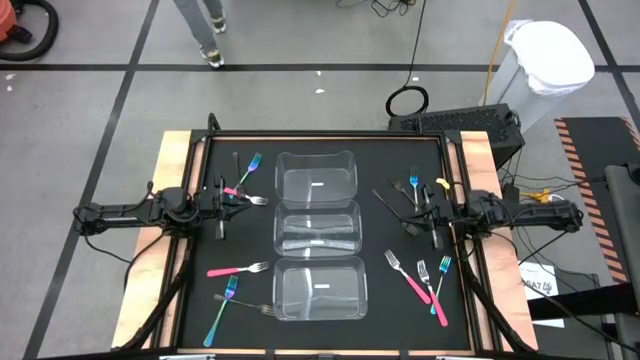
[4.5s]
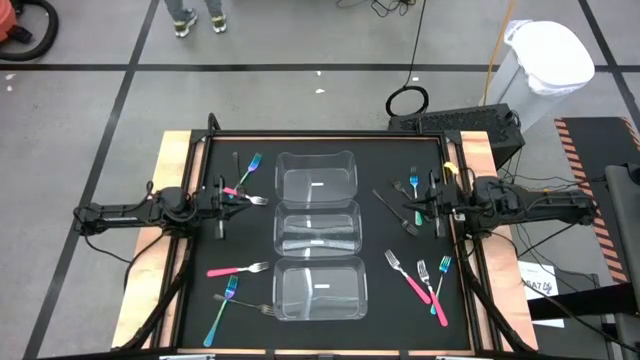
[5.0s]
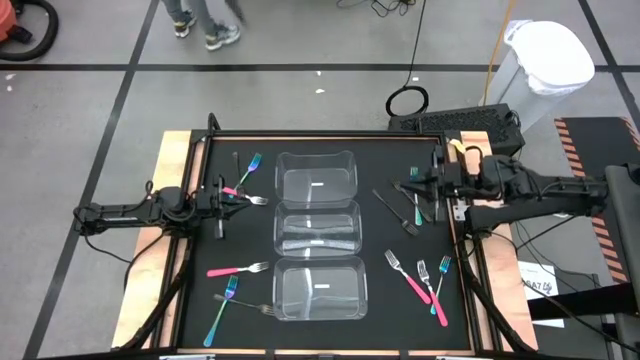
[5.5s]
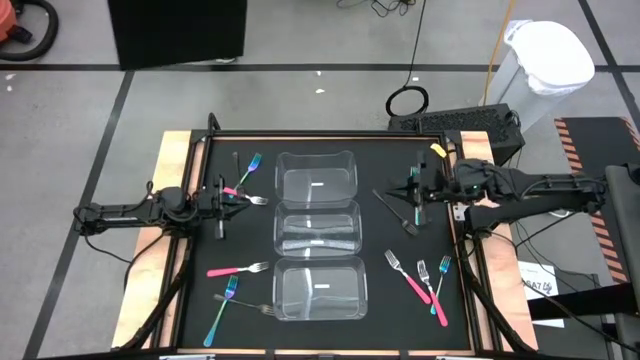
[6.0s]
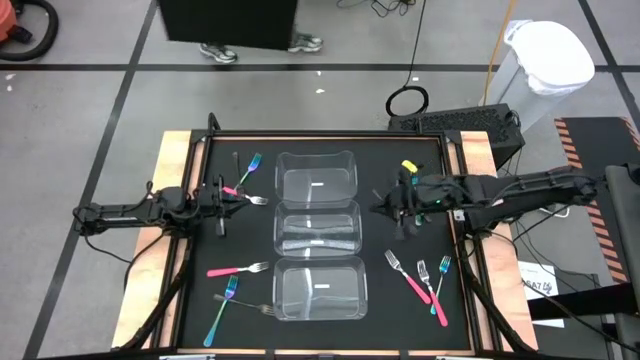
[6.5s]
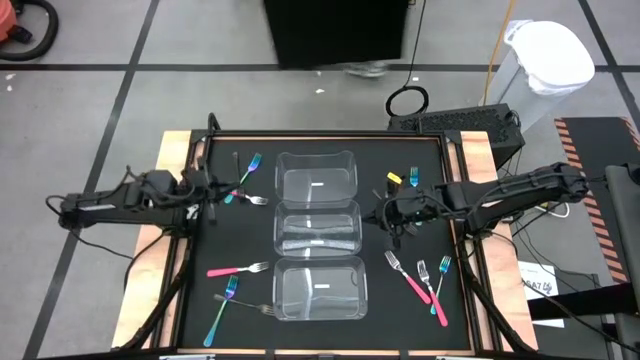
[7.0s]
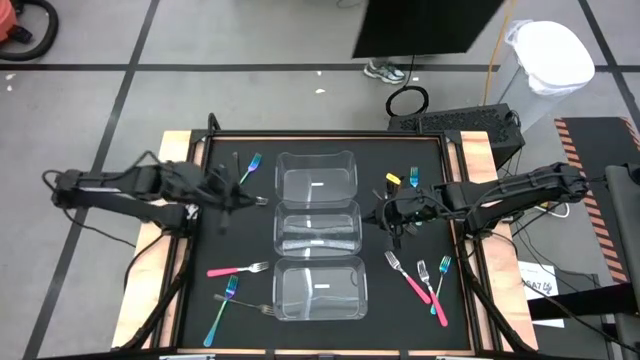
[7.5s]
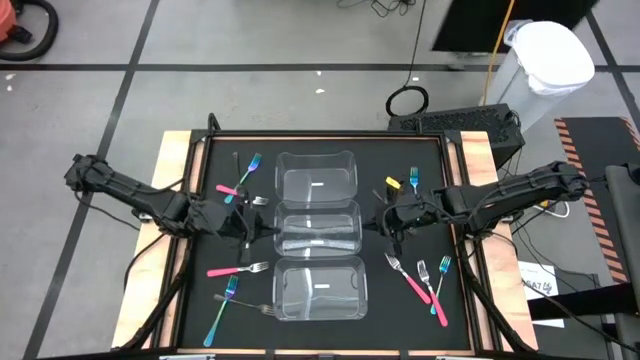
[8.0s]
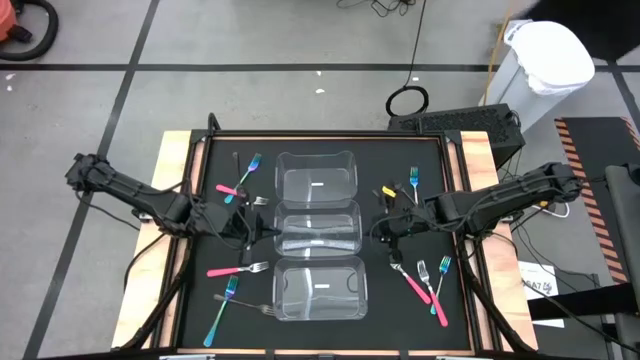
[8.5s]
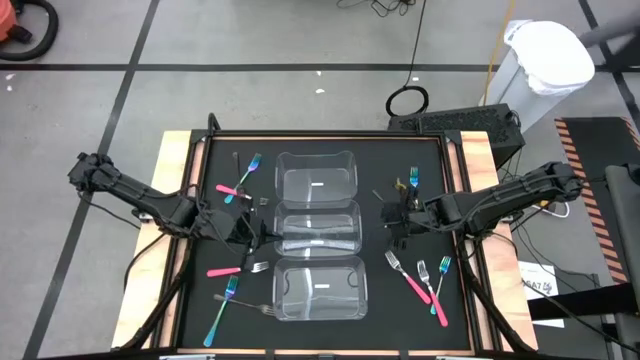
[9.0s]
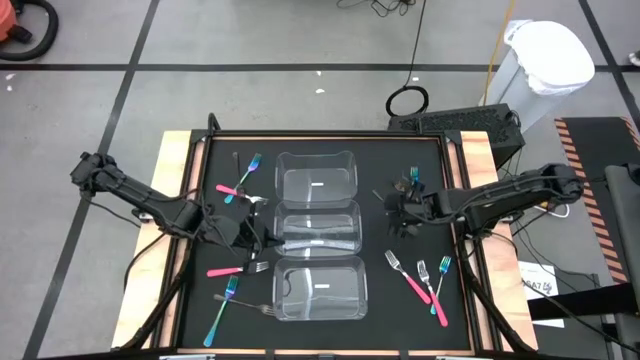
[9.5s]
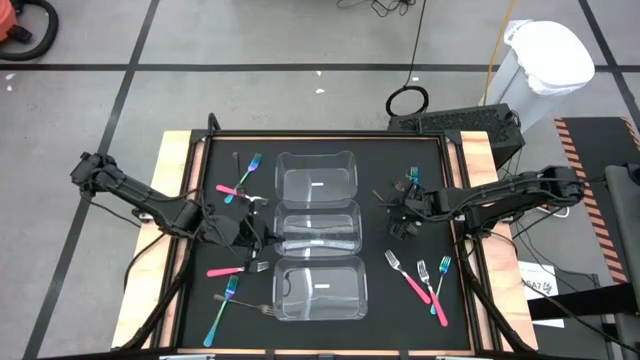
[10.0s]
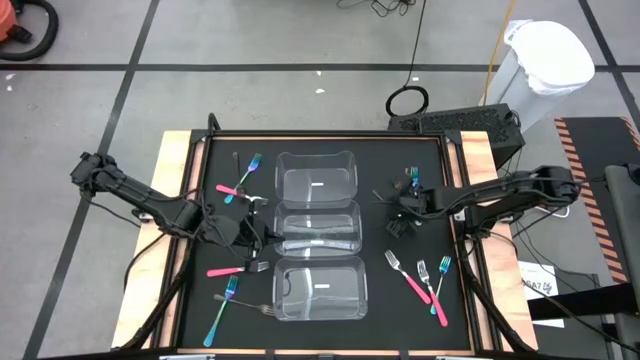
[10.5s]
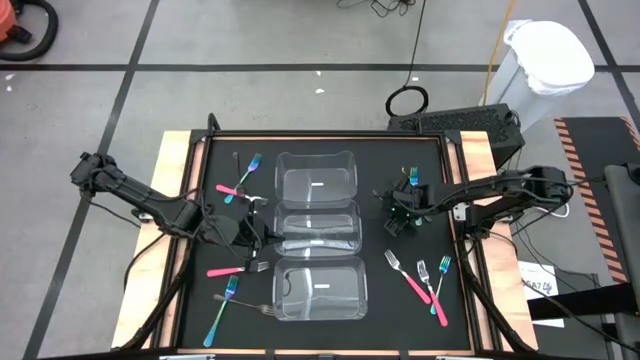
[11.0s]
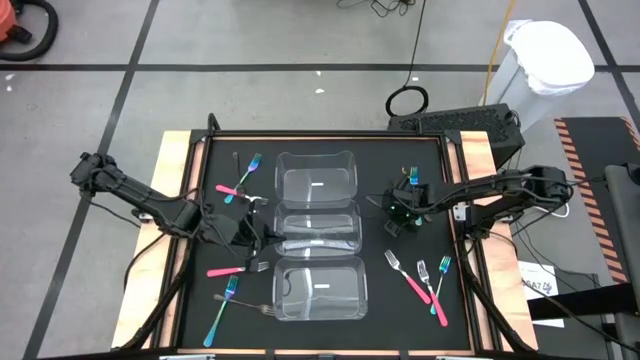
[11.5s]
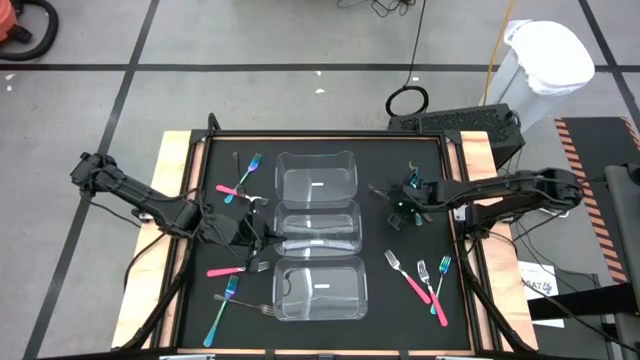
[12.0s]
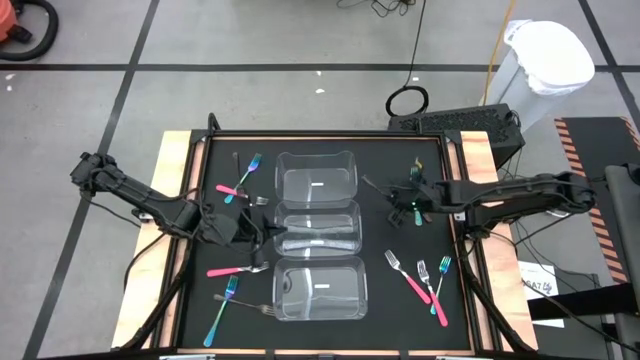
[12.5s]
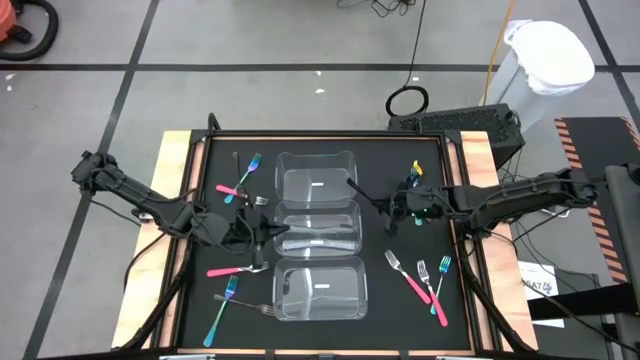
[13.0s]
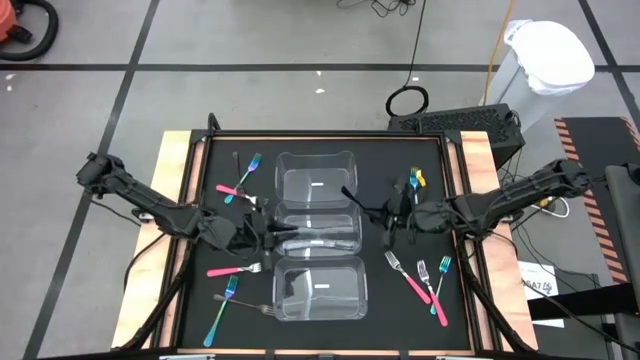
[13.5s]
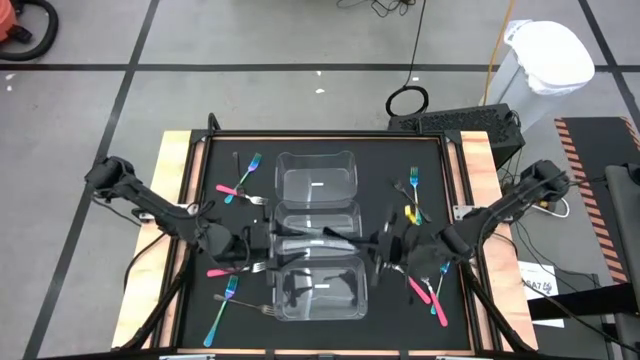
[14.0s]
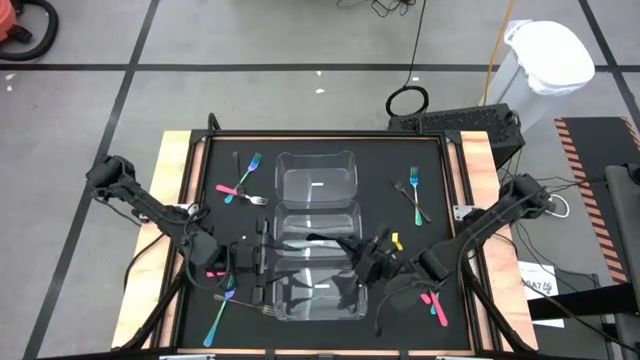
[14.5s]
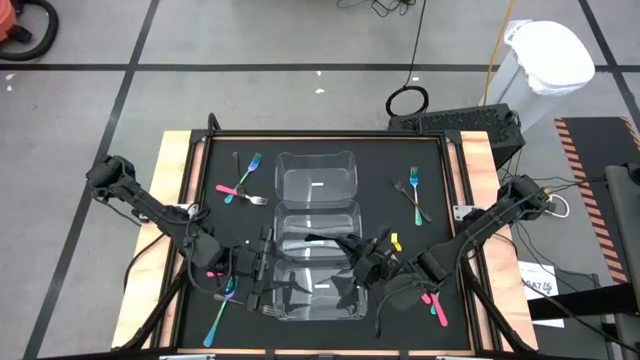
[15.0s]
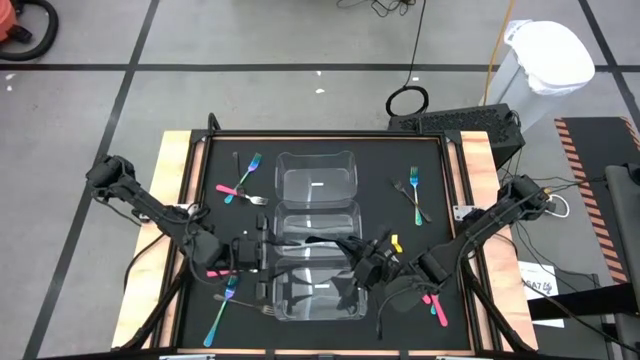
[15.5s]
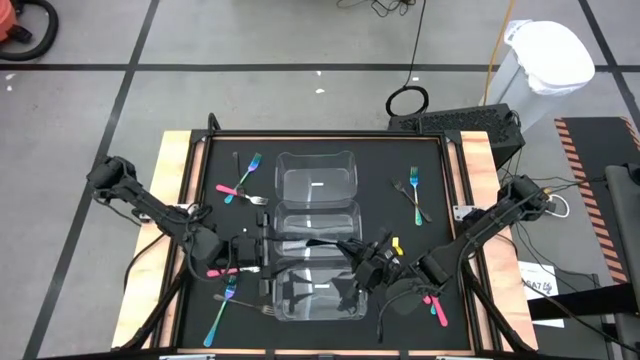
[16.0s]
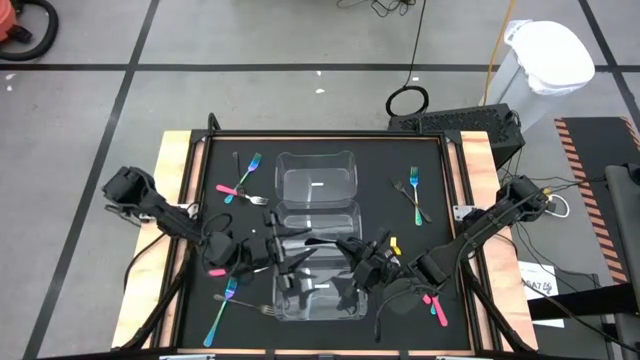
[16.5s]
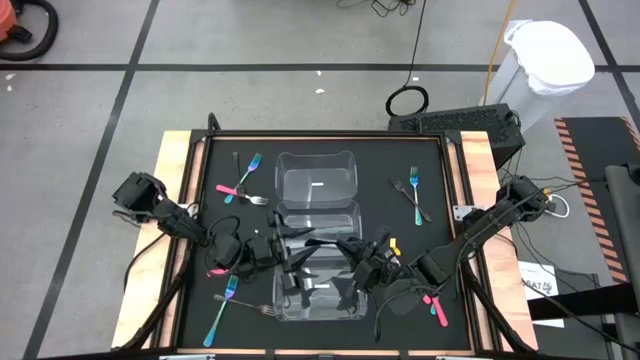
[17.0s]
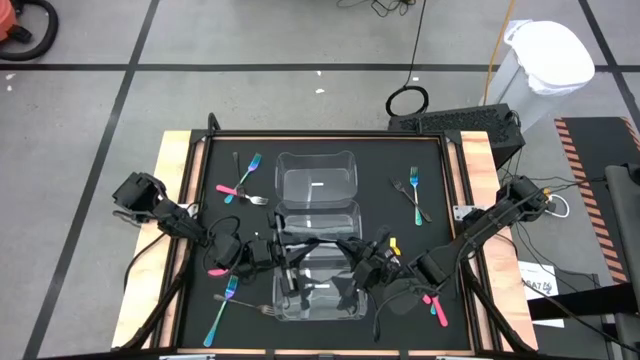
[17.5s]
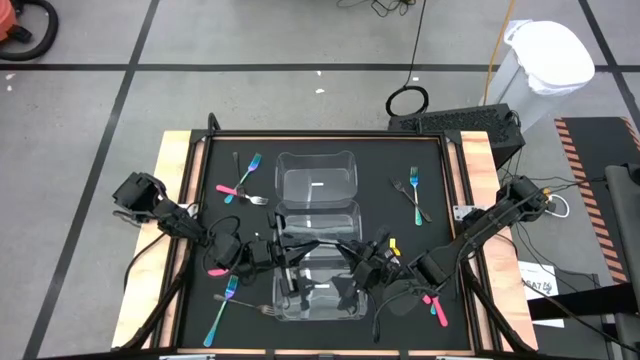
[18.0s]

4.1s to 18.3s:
Task: Sort silverware by color (type)
Put the middle black fork into the top transparent bin

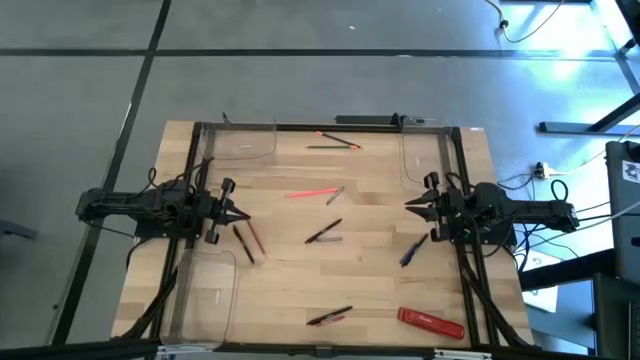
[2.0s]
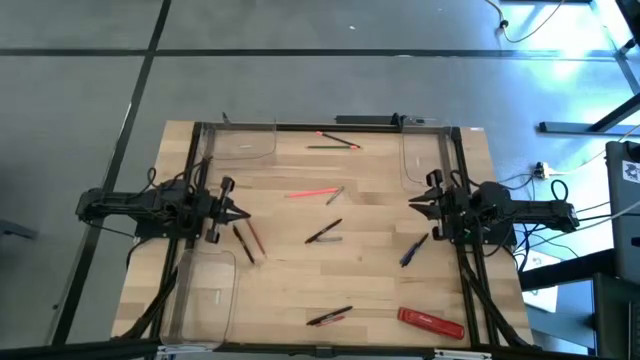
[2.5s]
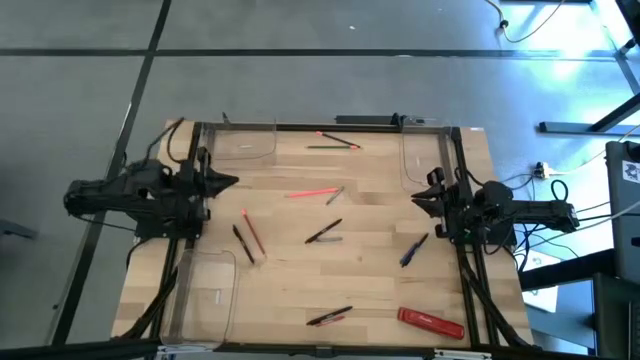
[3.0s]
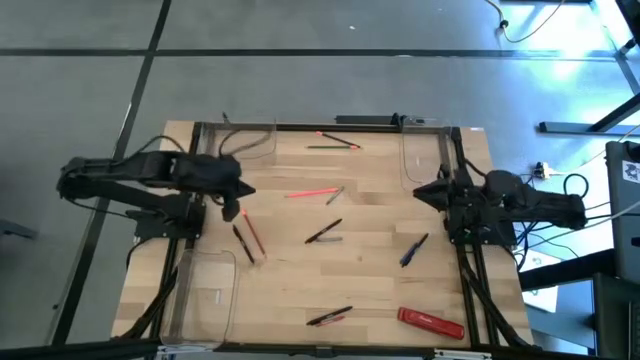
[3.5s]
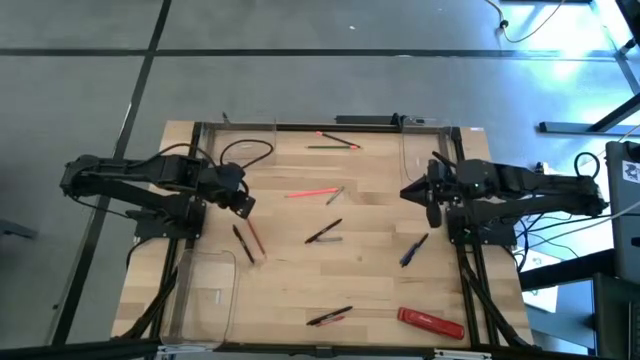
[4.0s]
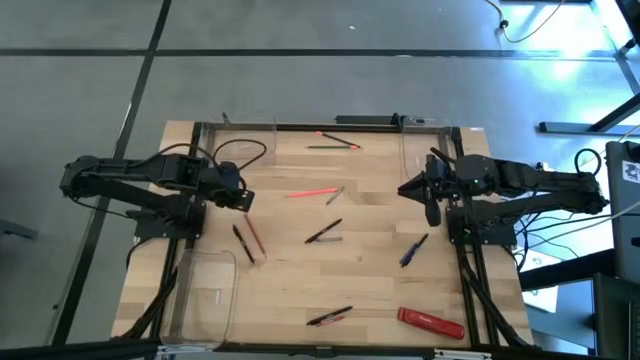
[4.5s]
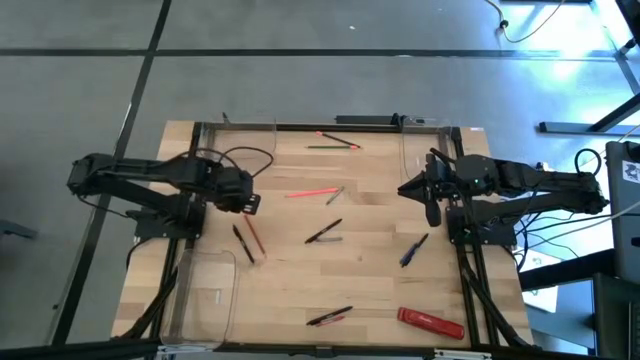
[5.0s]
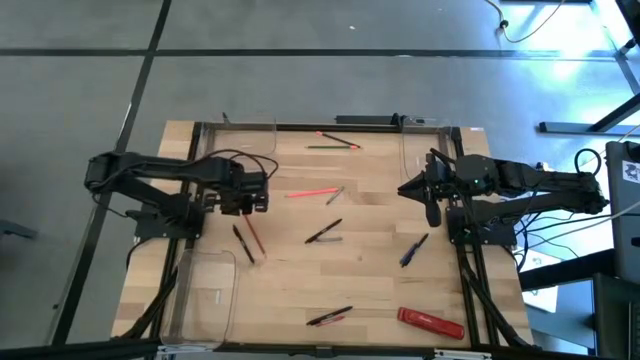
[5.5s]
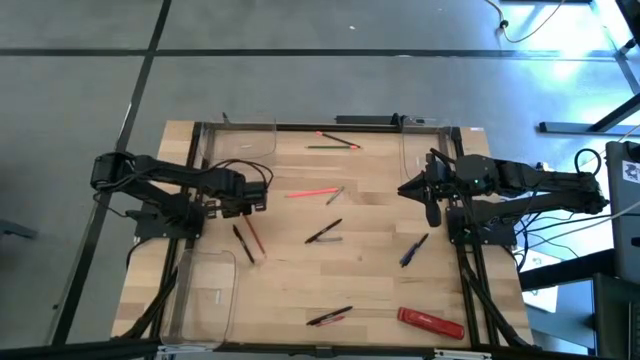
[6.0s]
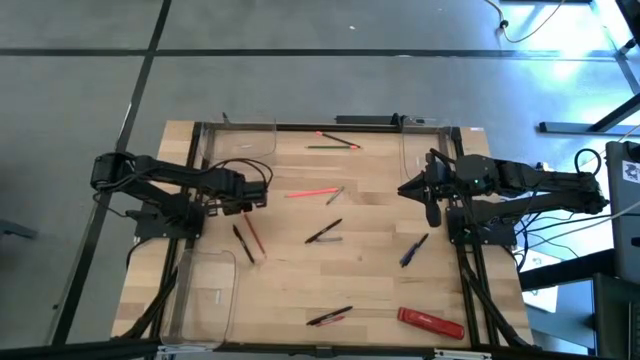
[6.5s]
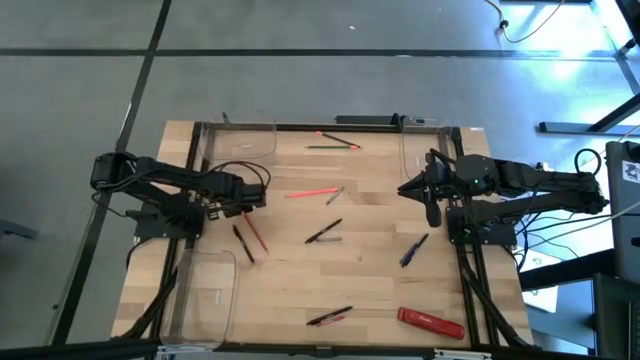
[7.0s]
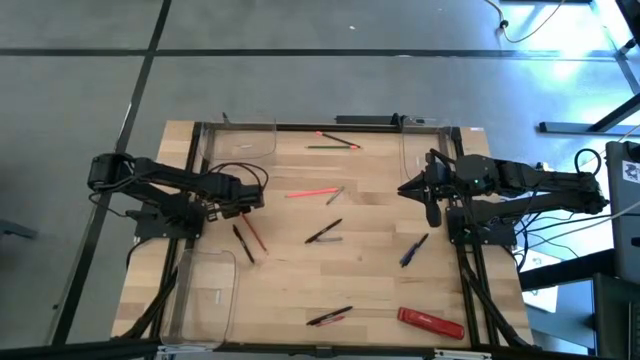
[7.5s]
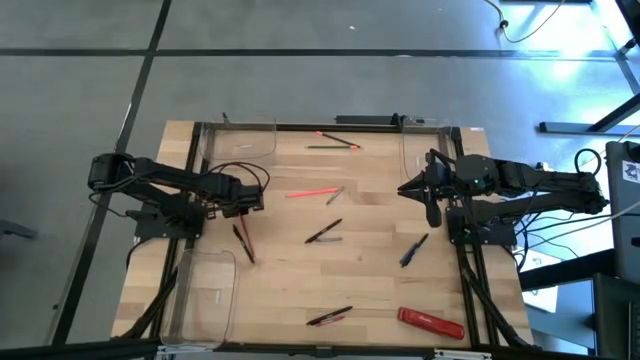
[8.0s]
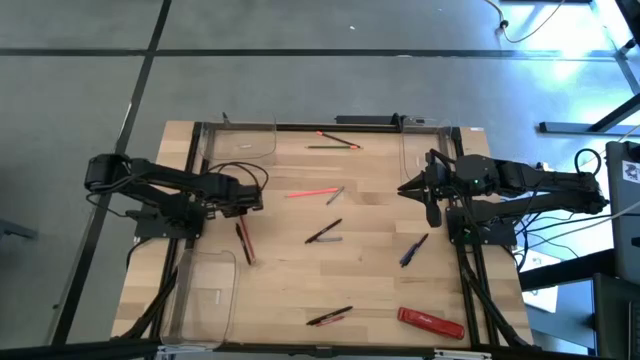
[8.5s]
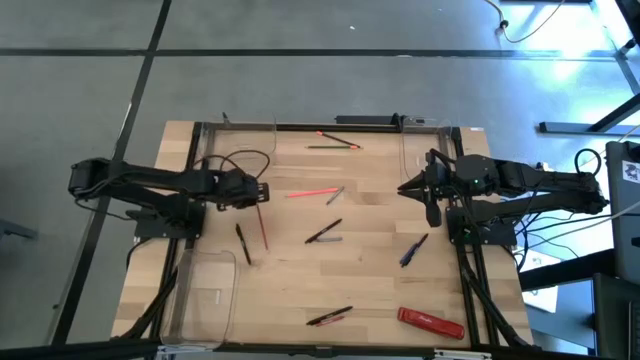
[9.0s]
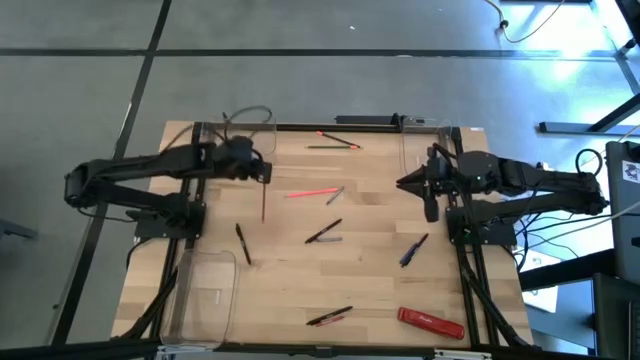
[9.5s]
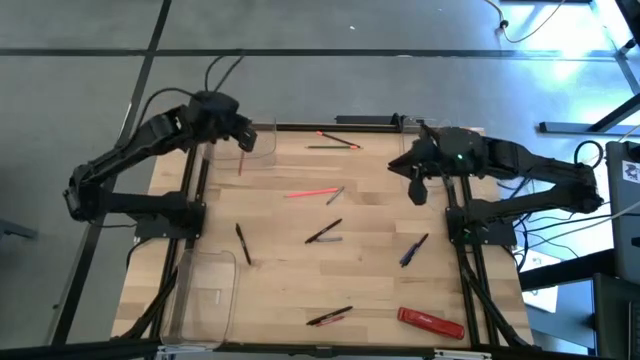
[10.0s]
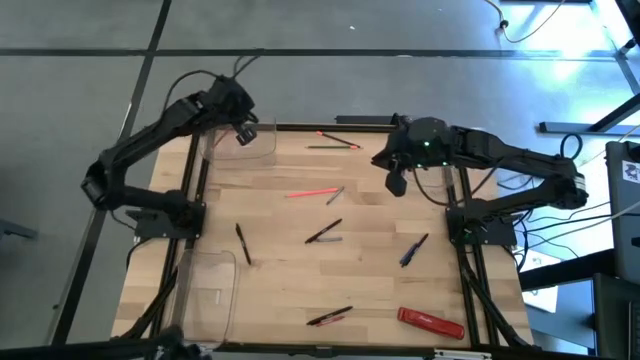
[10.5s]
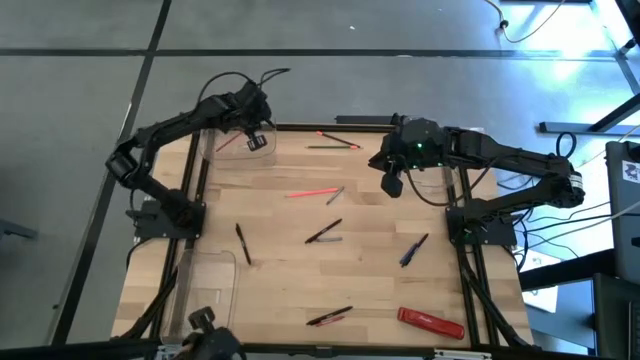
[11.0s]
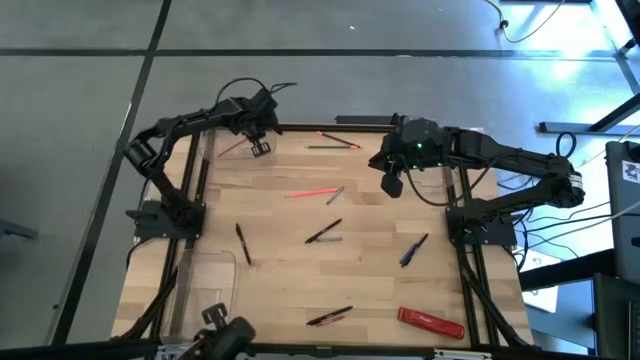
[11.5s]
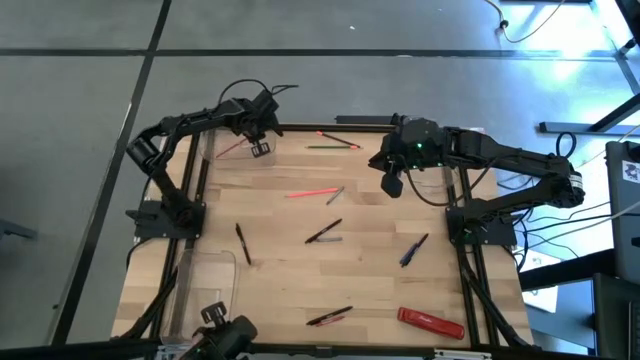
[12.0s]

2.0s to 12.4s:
Task: Sort crayons/erasers/pens/pencils in bins
Put the red pencil into the top left transparent bin
